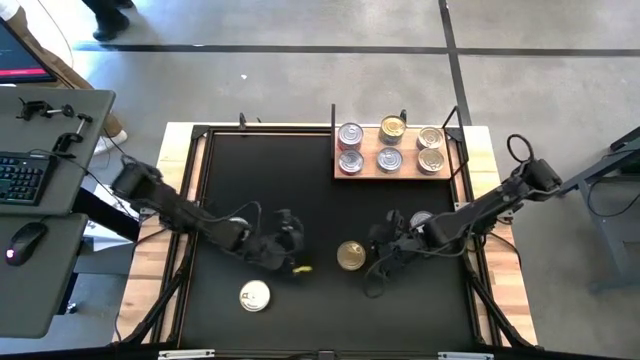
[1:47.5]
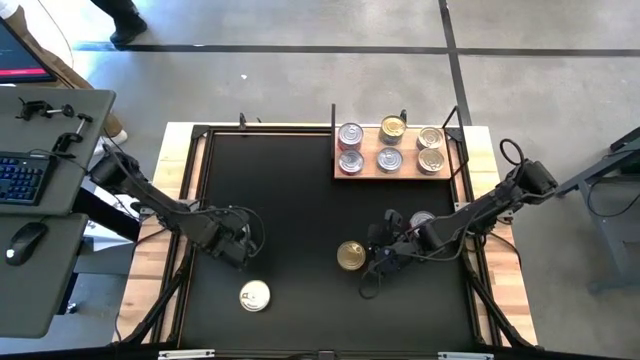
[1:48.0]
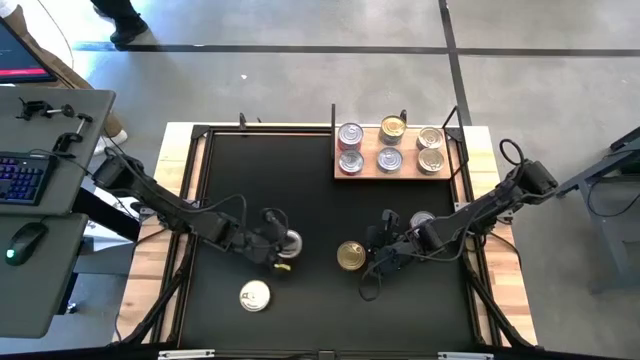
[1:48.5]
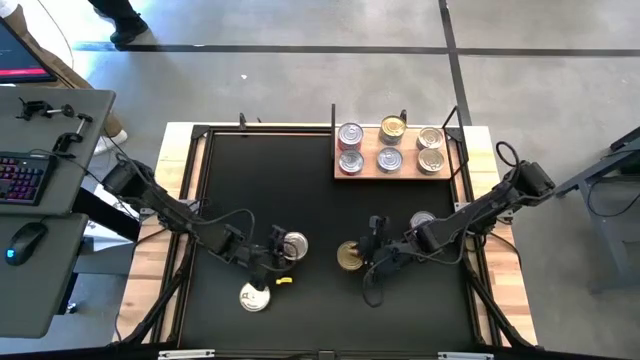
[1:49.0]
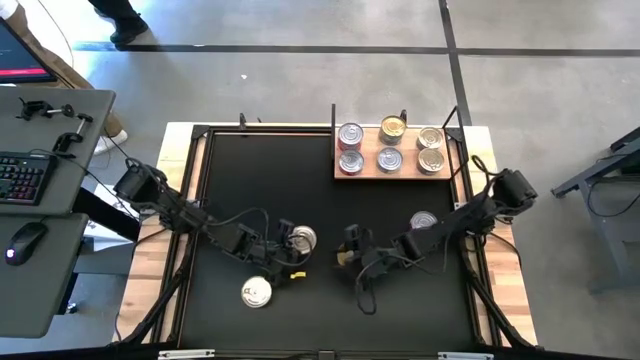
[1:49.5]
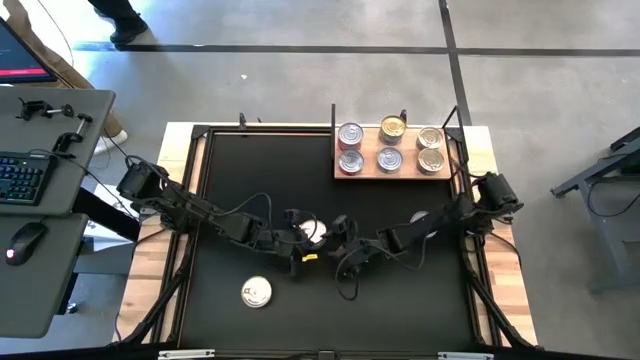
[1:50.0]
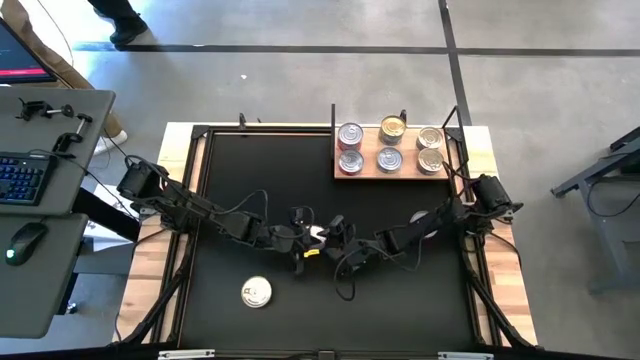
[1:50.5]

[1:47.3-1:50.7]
Task: Stack canned seafood by type on shelf
Stack the blue tuna can on top of the upper blue tuna can on the shelf

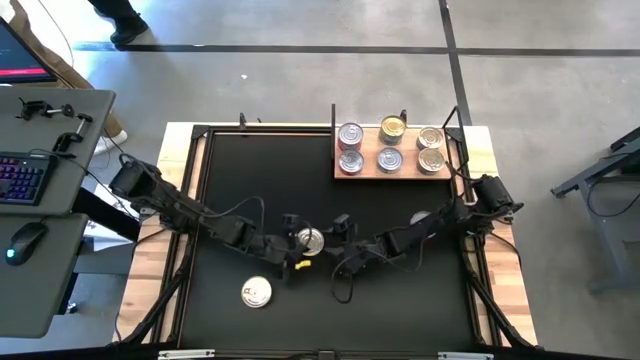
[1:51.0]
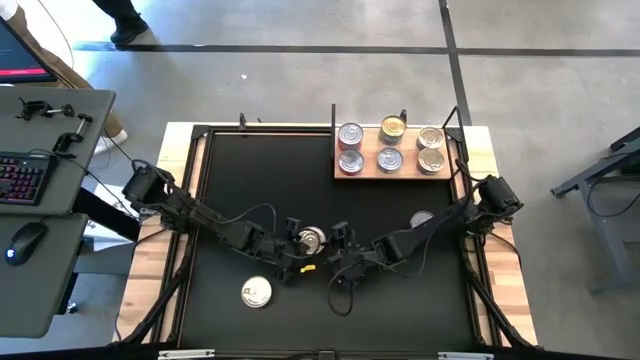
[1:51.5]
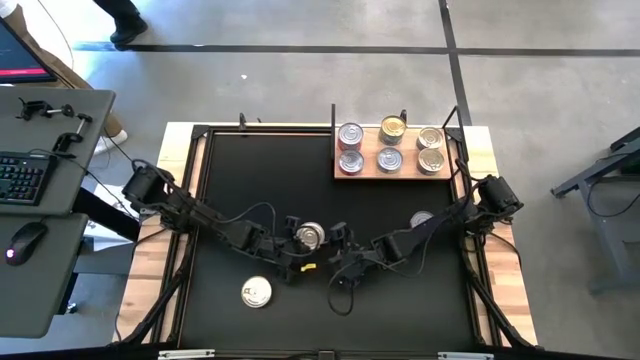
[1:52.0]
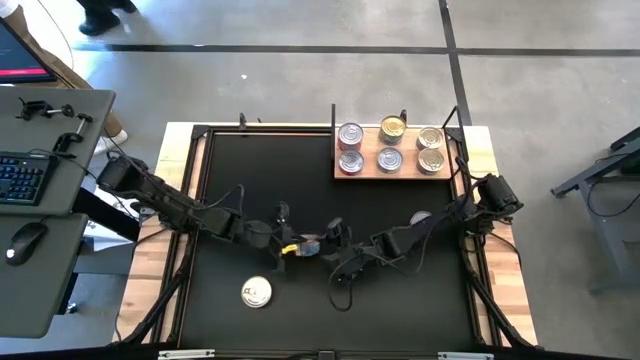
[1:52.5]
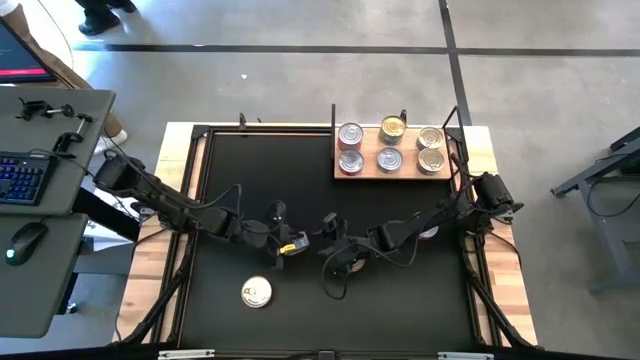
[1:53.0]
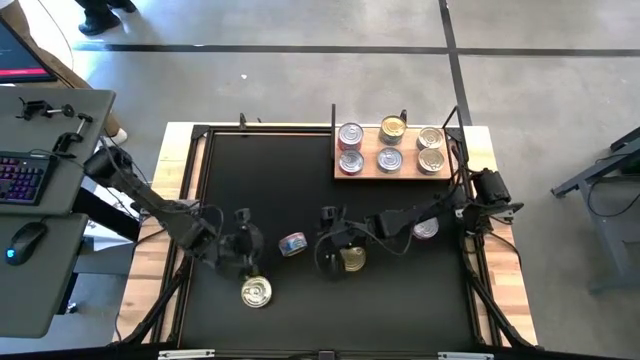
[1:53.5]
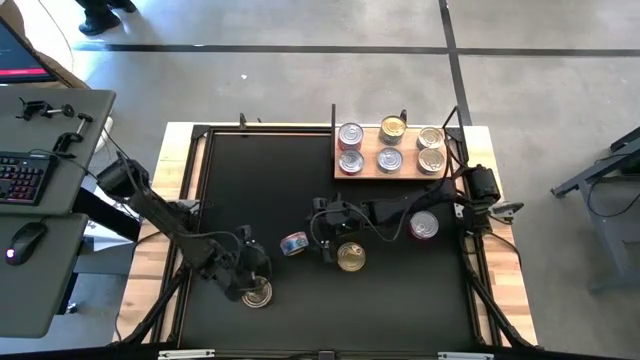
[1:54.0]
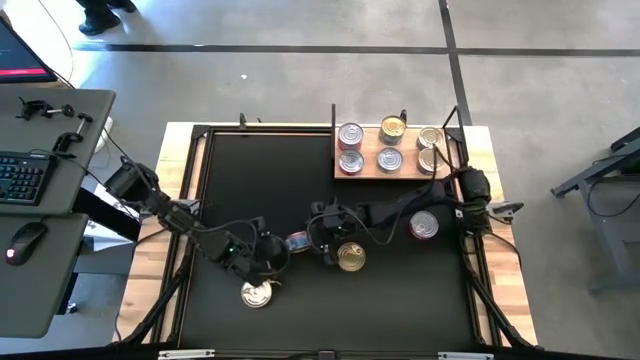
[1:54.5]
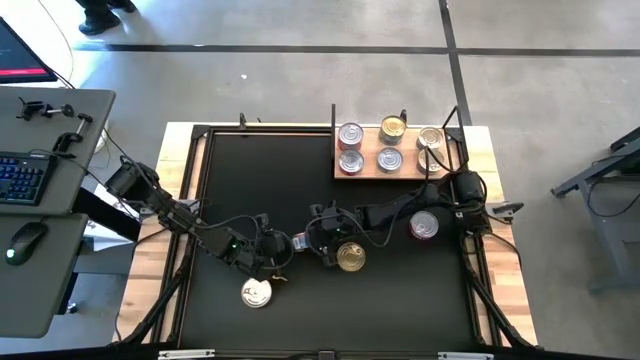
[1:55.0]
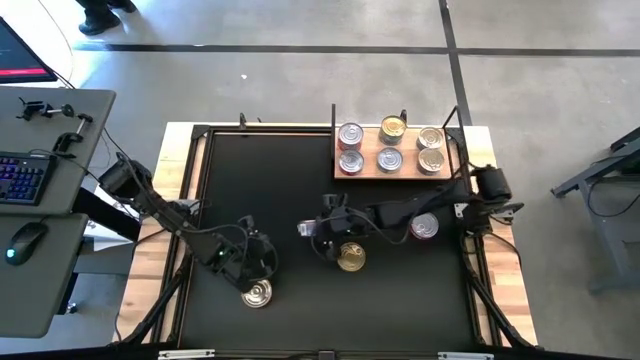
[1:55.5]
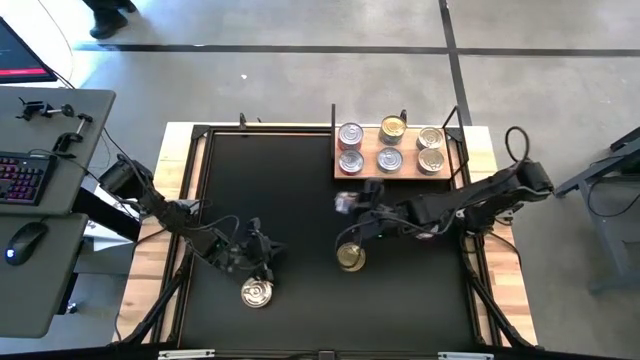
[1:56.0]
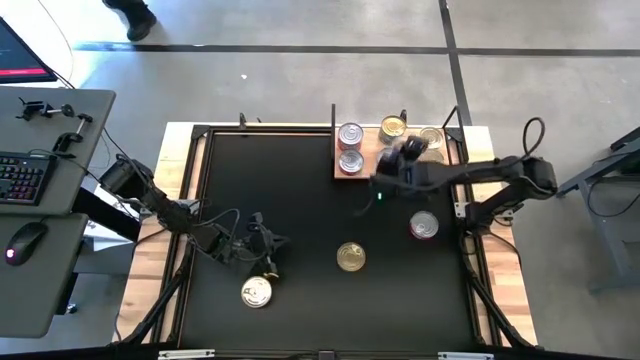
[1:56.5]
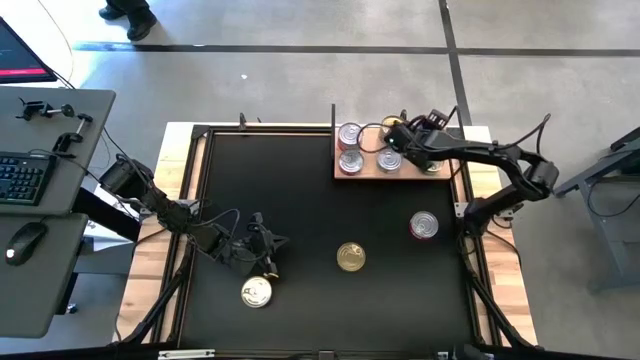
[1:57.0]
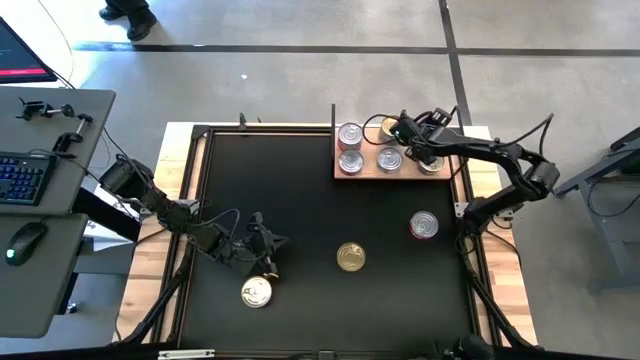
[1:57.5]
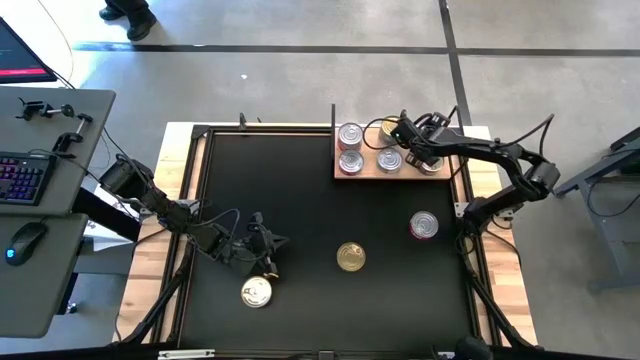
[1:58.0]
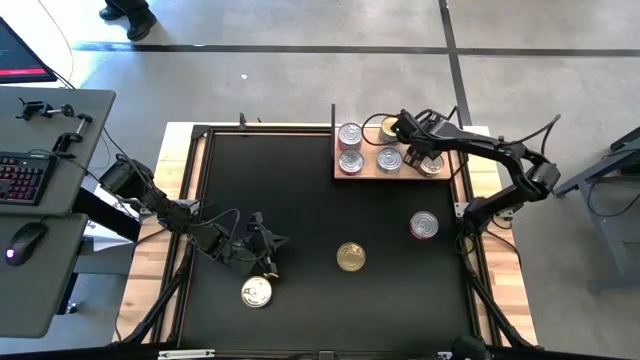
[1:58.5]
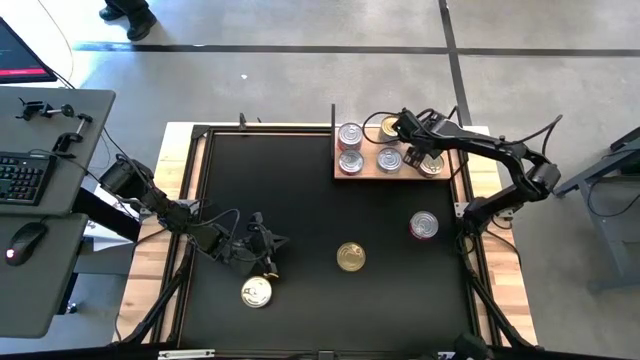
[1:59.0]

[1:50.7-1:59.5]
Stack the blue tuna can on top of the upper blue tuna can on the shelf

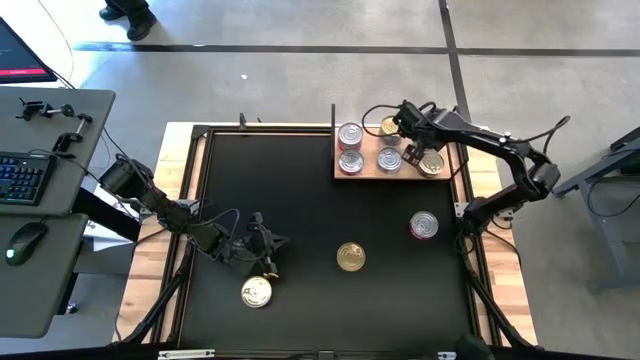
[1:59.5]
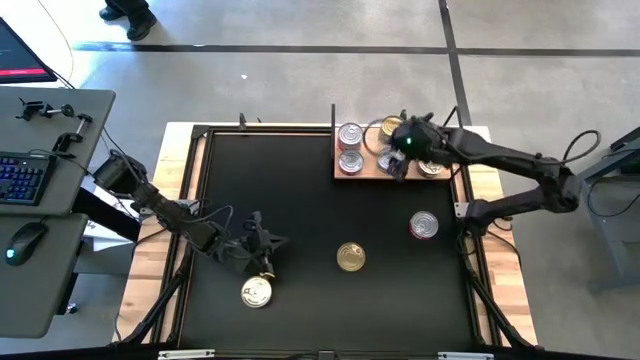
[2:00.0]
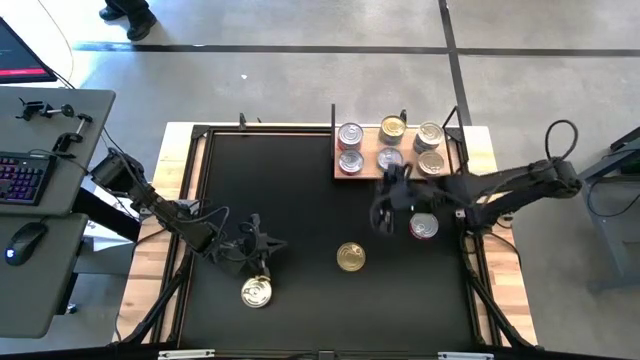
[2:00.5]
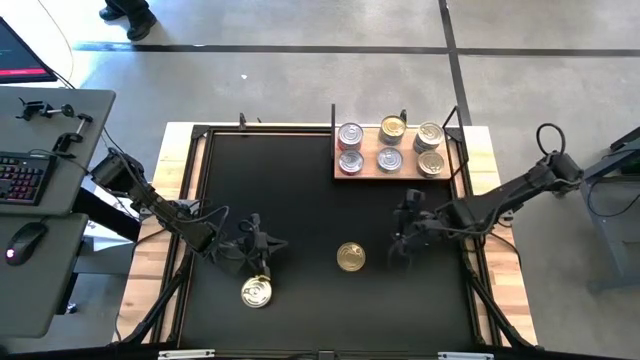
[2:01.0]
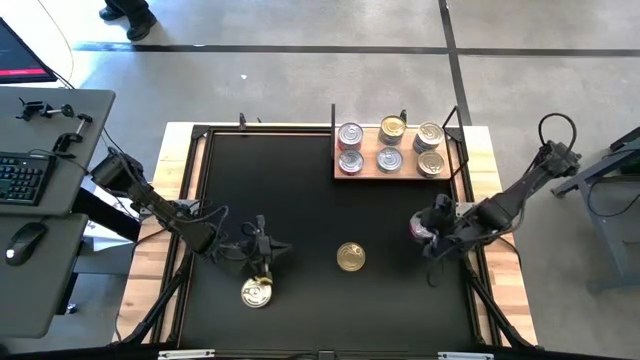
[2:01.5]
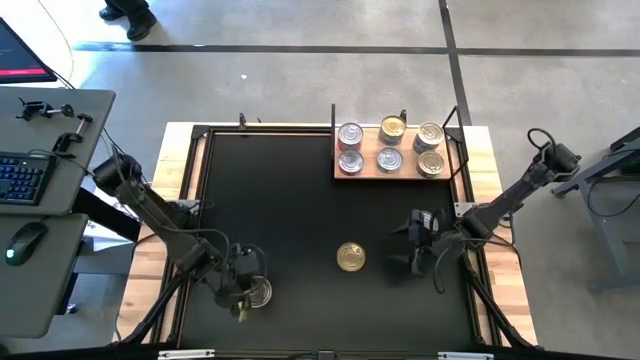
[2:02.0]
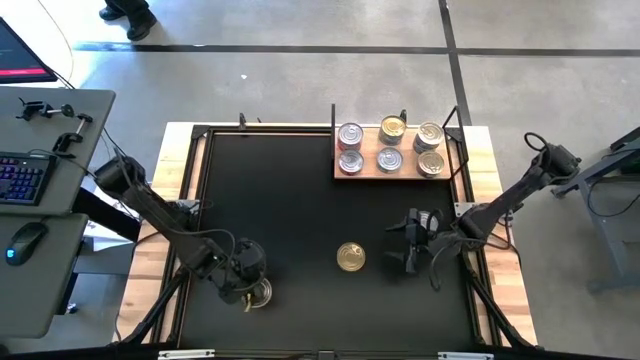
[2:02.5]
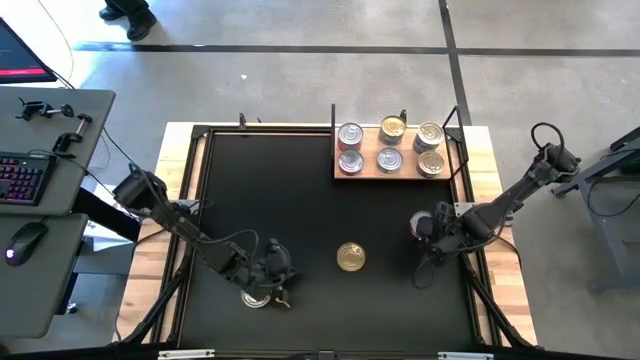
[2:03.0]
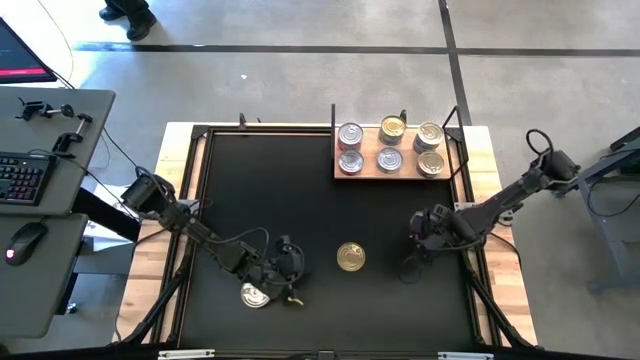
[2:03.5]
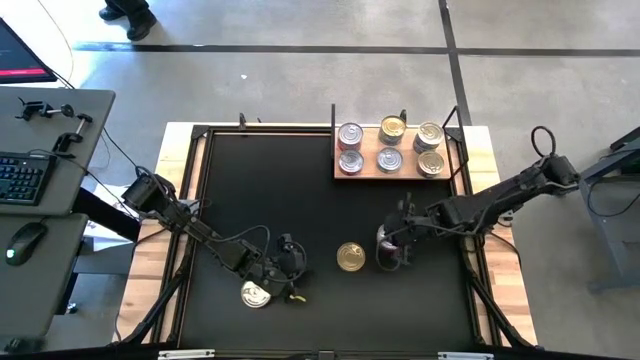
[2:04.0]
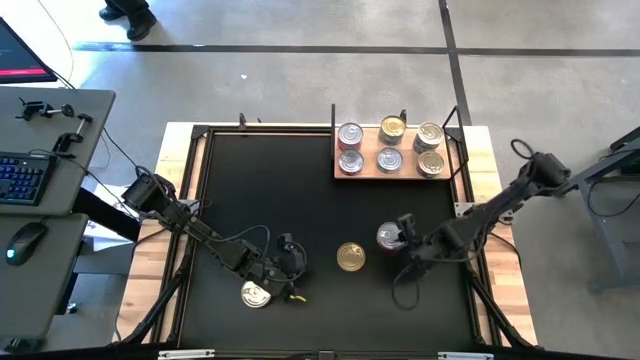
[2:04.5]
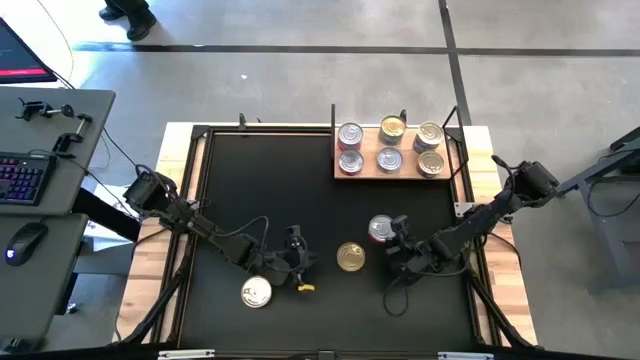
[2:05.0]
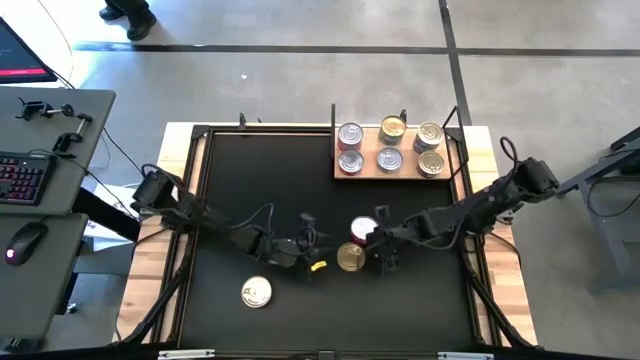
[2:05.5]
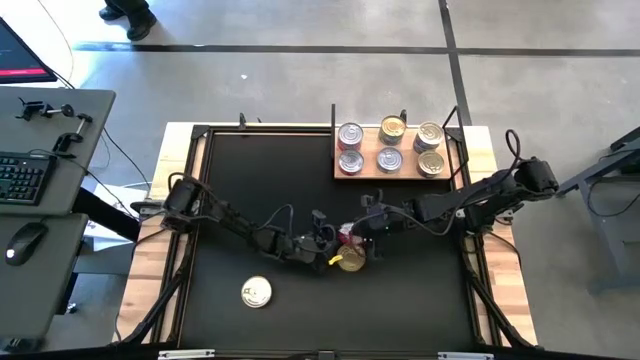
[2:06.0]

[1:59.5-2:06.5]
Stack the red tuna can on top of the bottom red tuna can on the shelf

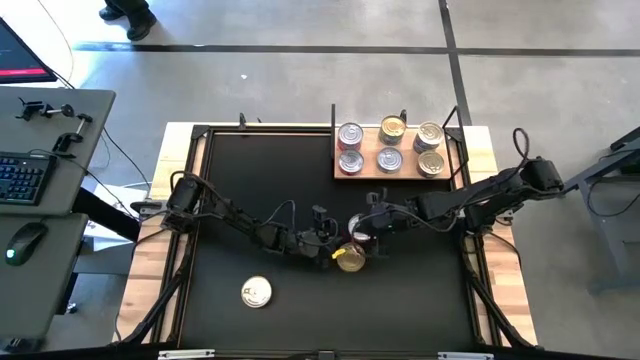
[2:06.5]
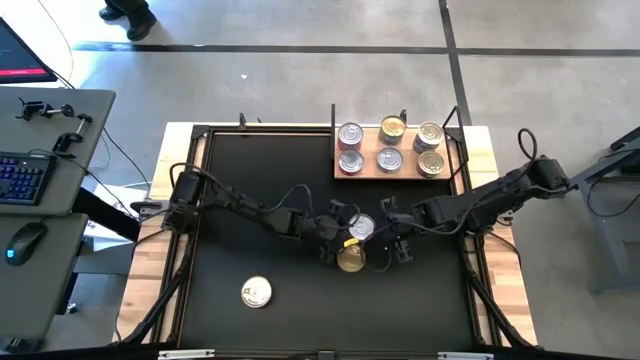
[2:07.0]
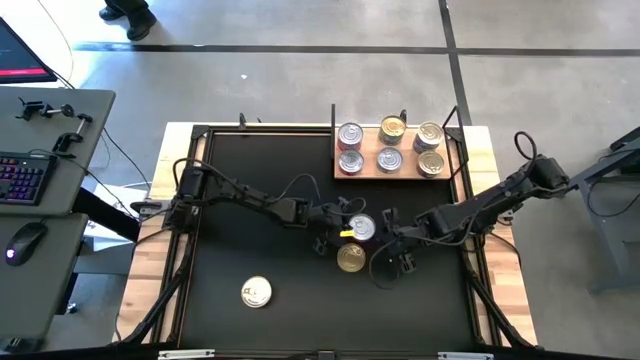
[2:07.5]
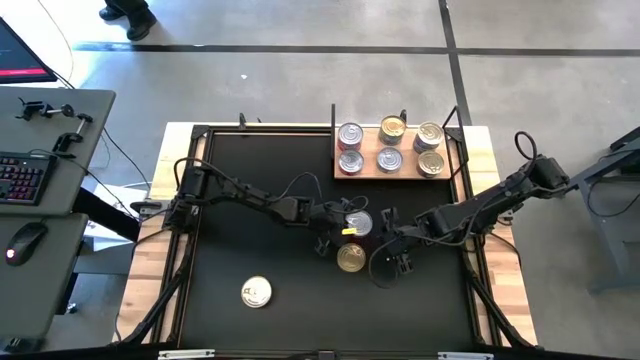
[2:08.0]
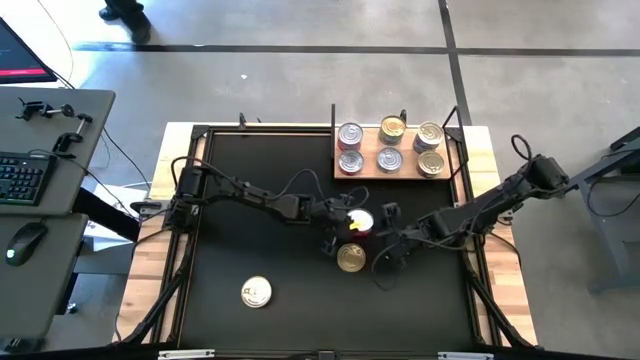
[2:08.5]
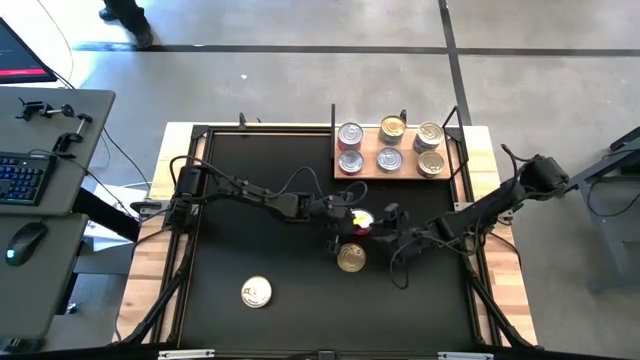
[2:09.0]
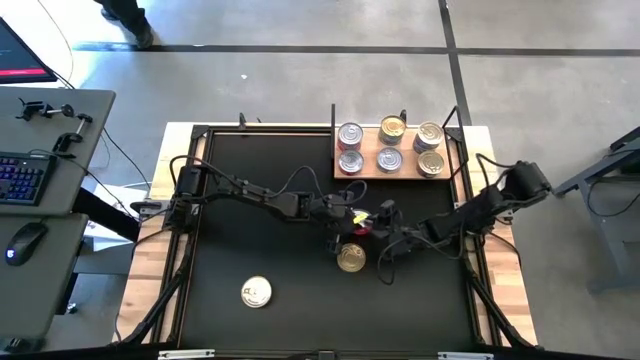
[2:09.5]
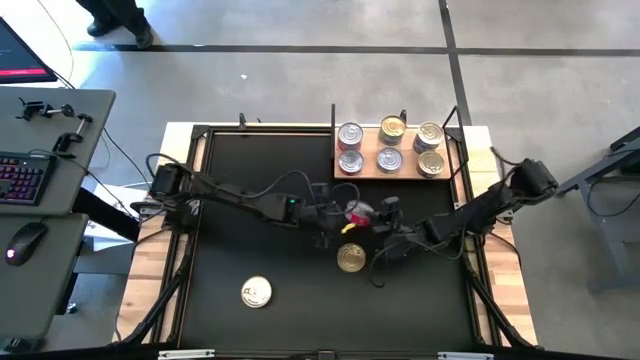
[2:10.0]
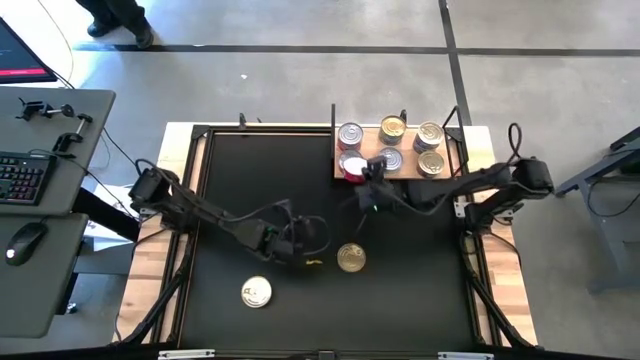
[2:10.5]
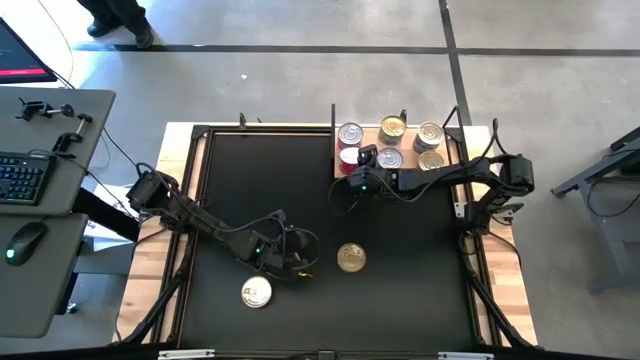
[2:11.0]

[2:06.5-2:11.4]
Stack the red tuna can on top of the bottom red tuna can on the shelf
